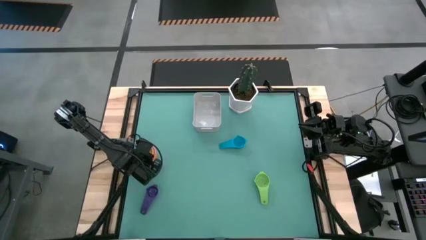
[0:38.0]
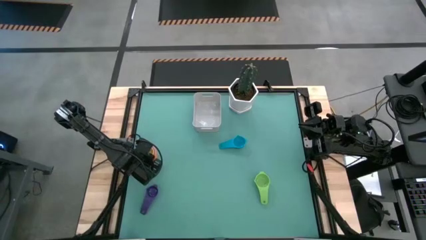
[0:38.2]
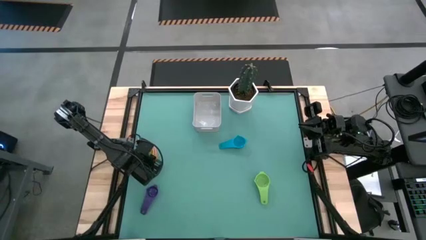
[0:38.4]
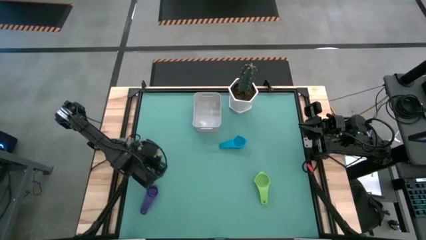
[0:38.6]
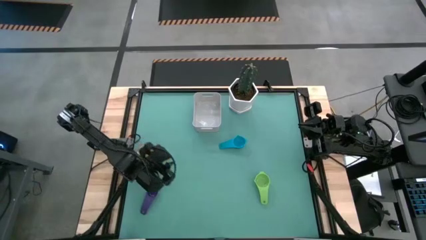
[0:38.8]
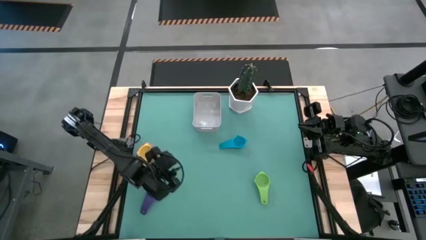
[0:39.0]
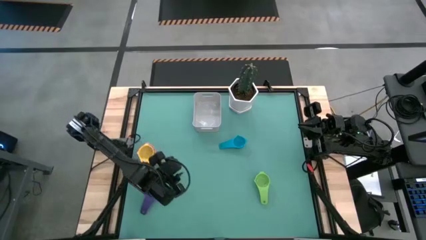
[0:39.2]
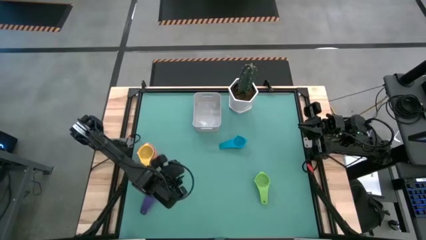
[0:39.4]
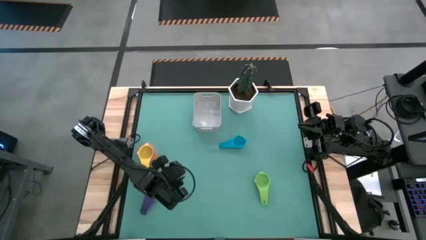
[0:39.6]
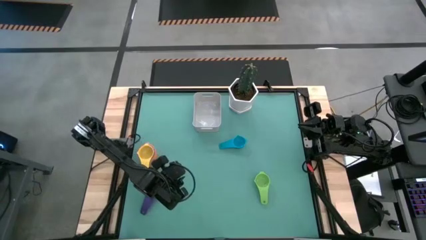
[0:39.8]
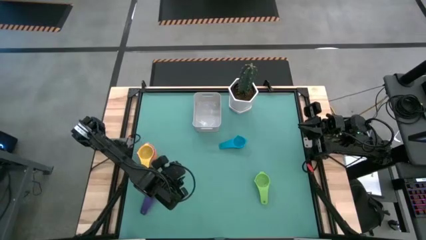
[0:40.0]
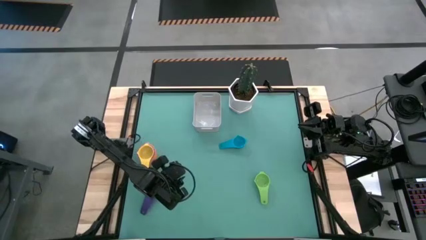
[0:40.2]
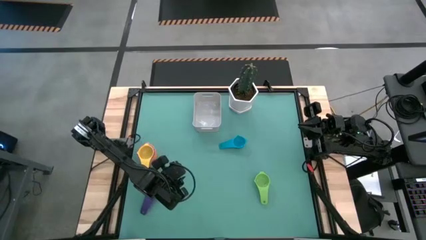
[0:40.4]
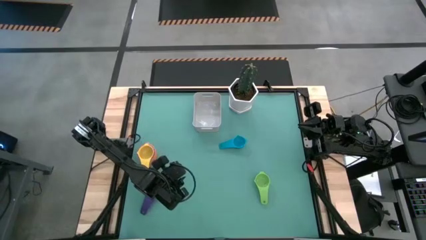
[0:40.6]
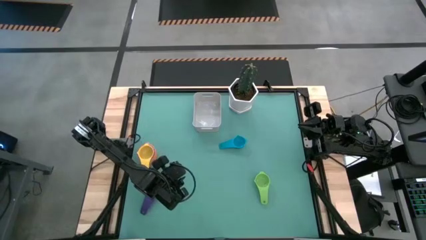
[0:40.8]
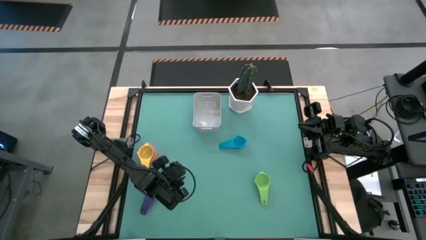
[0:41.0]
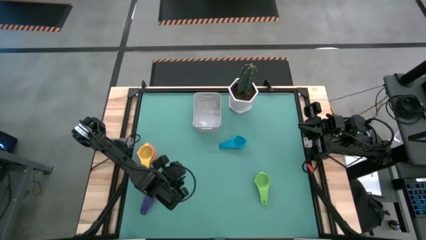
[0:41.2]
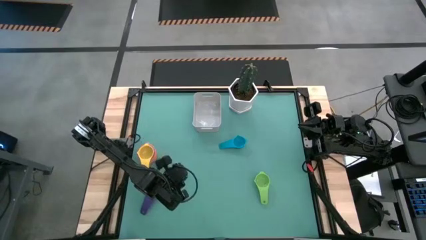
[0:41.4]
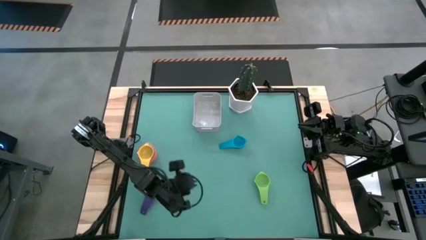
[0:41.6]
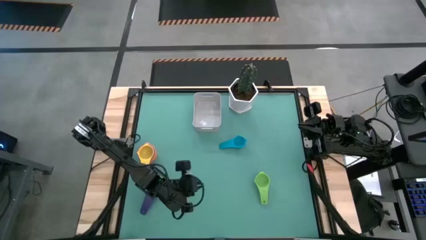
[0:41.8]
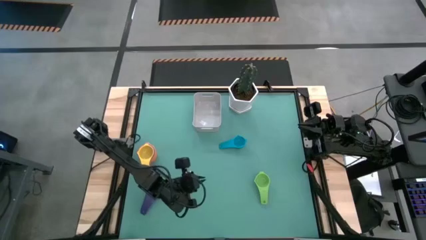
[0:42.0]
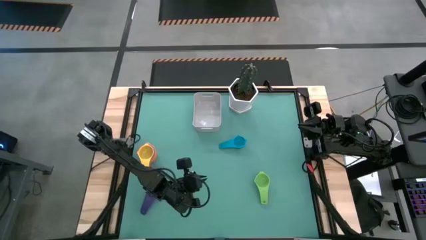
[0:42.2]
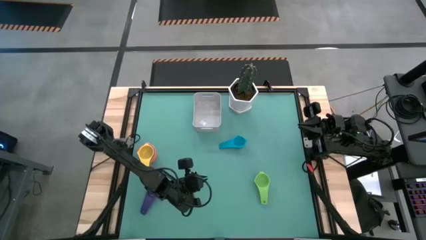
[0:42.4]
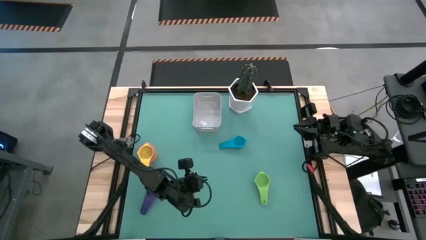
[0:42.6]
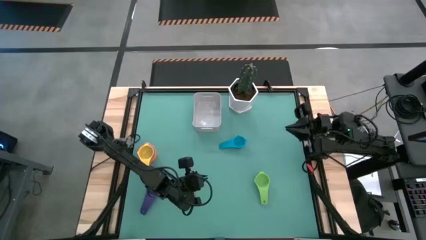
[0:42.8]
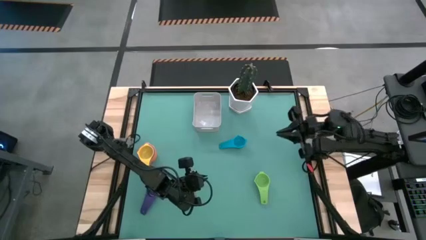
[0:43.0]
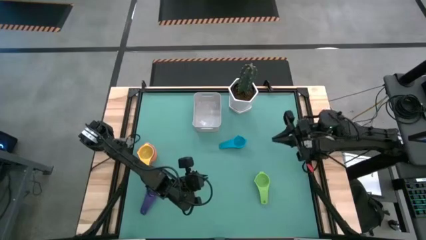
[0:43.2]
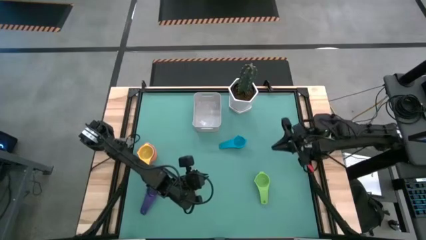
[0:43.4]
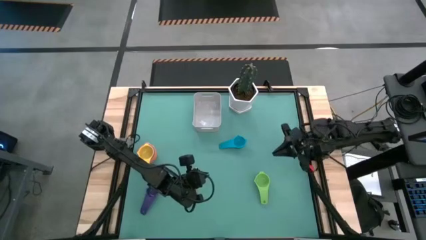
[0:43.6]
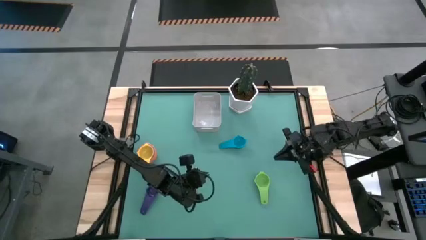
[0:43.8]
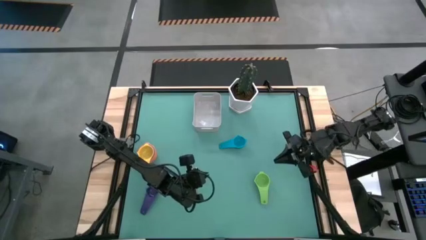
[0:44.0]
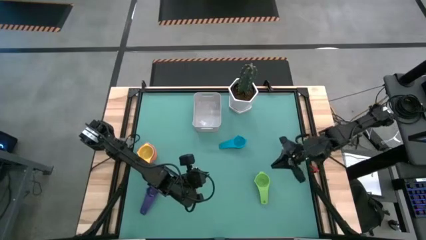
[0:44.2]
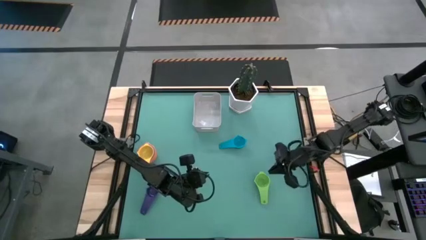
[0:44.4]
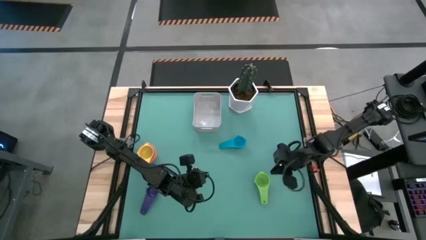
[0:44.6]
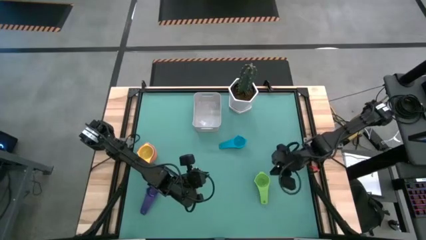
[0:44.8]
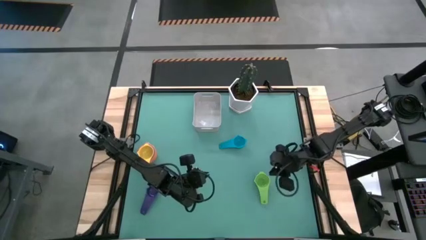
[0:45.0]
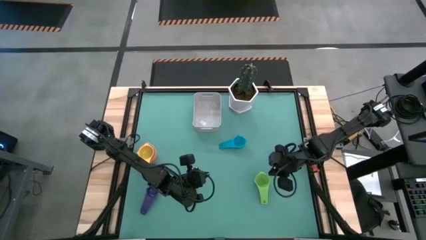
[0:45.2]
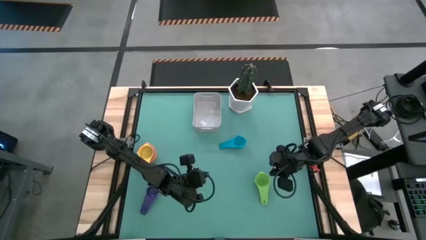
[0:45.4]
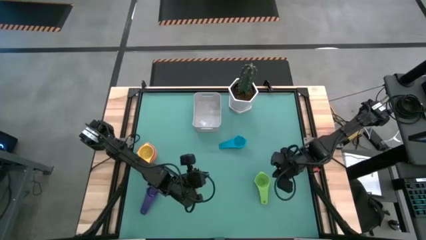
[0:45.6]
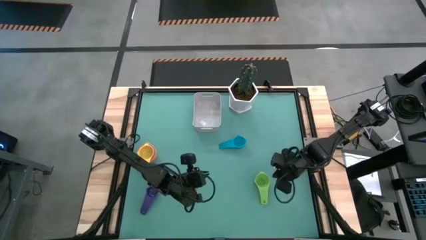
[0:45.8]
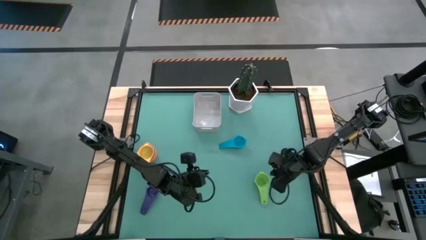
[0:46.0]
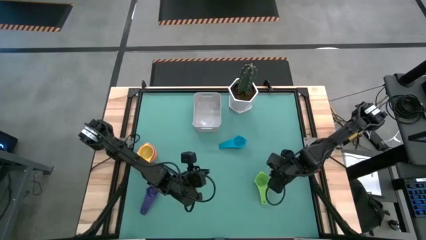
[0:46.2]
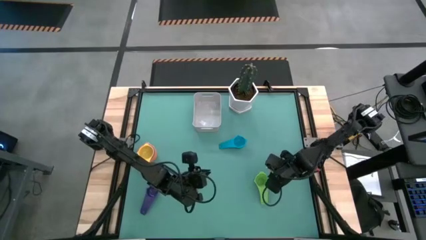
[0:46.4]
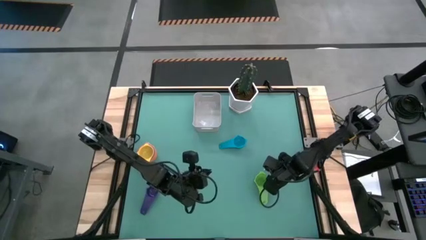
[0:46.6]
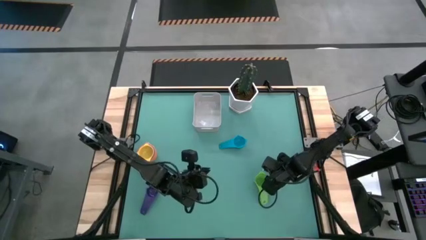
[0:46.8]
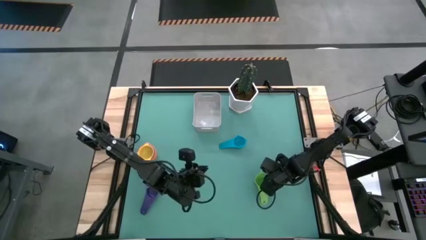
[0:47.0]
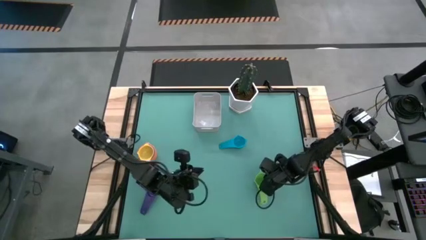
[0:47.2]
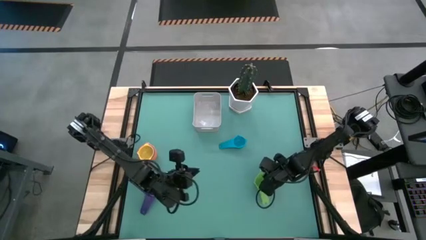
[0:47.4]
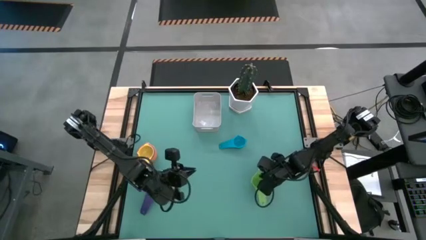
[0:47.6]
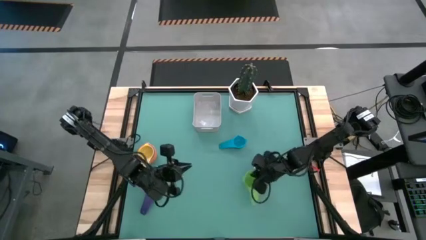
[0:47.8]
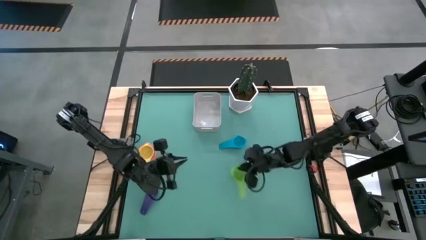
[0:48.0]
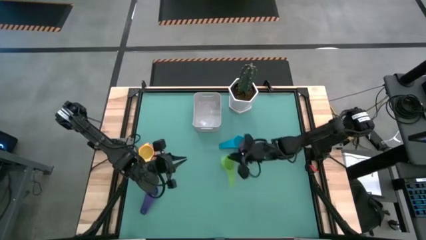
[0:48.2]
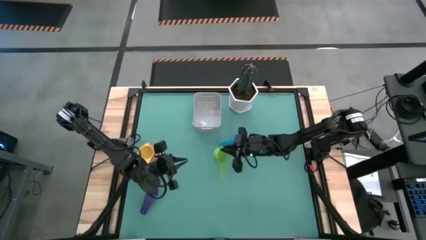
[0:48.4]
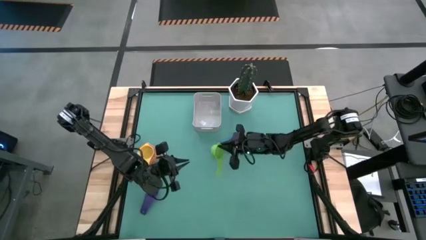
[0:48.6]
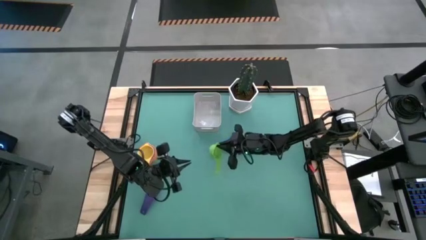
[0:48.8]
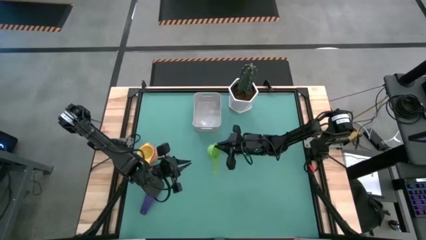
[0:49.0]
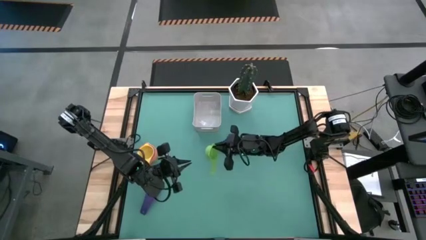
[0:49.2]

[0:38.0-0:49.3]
Task: Nest measuring cups in basket
Stack the green measuring cup on top of the yellow measuring cup

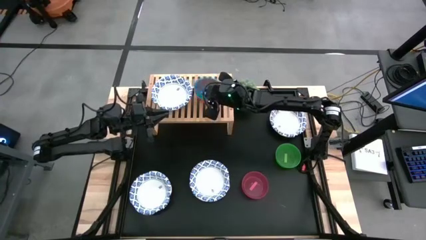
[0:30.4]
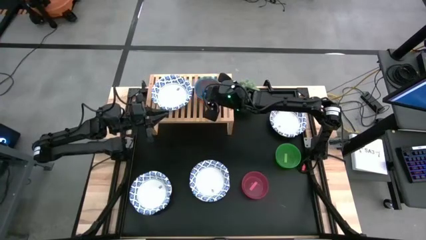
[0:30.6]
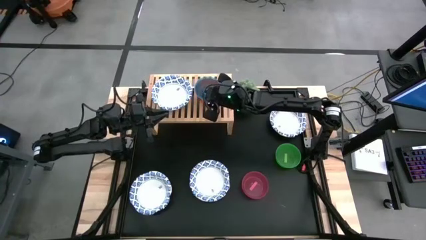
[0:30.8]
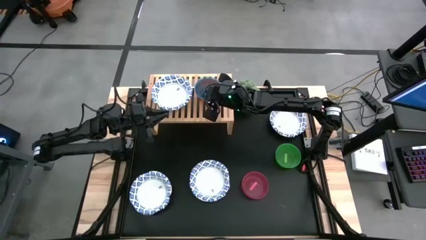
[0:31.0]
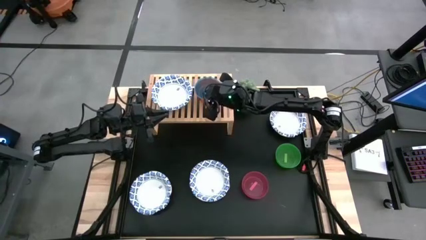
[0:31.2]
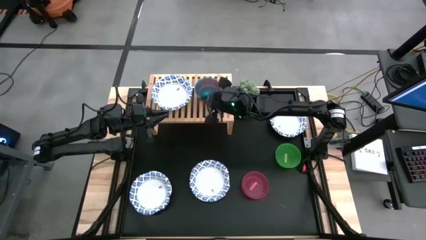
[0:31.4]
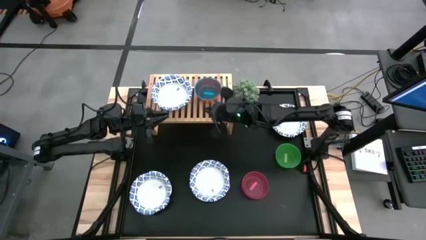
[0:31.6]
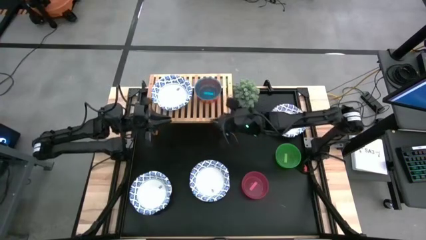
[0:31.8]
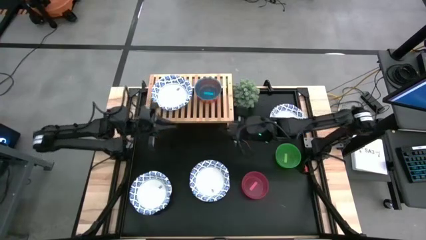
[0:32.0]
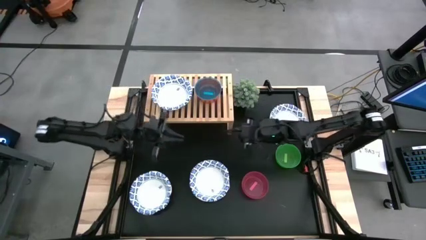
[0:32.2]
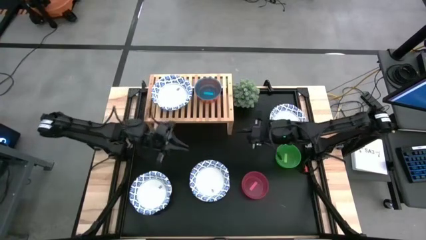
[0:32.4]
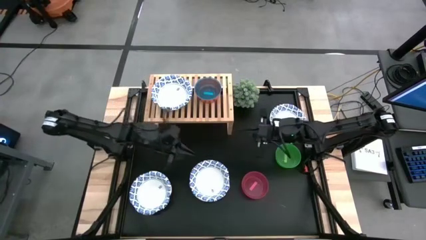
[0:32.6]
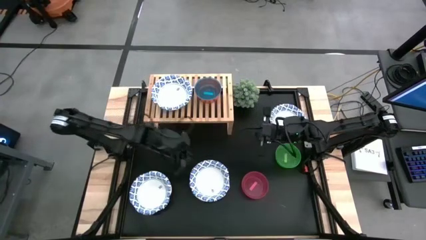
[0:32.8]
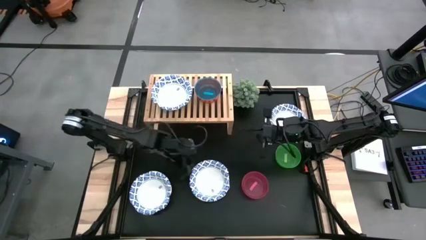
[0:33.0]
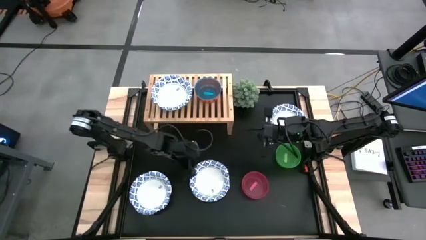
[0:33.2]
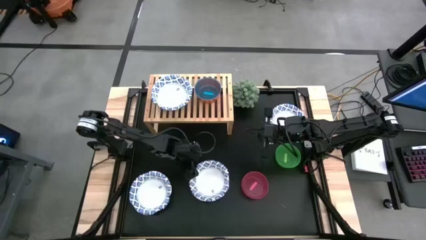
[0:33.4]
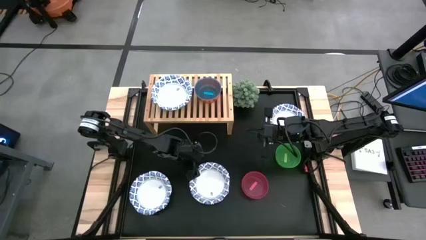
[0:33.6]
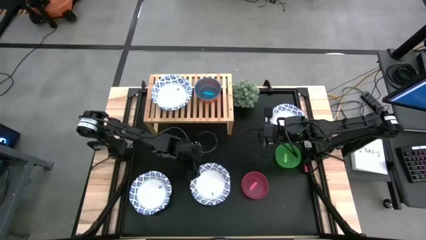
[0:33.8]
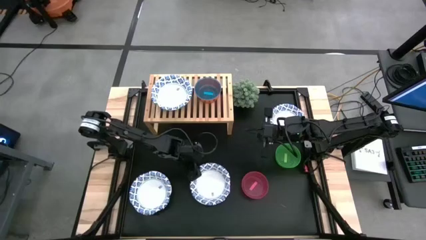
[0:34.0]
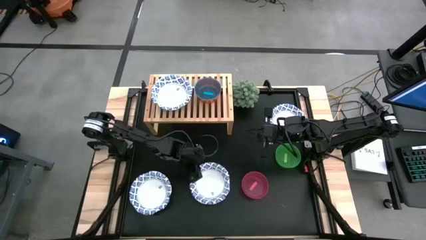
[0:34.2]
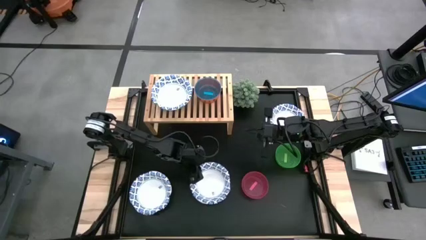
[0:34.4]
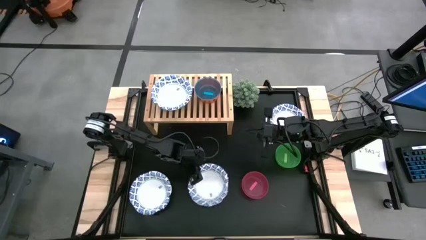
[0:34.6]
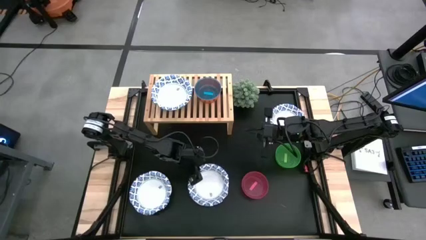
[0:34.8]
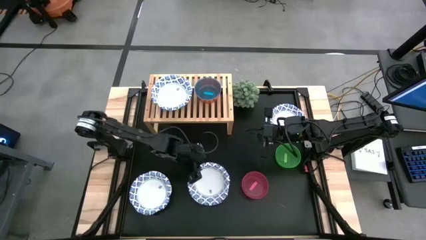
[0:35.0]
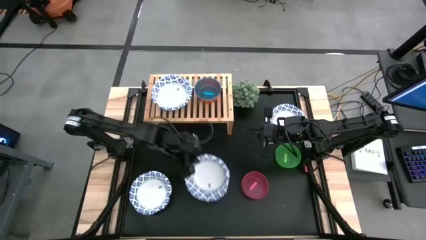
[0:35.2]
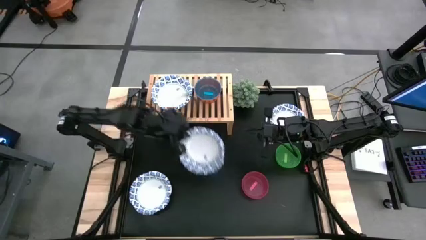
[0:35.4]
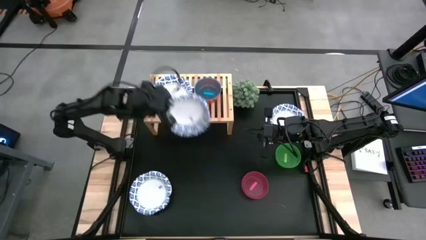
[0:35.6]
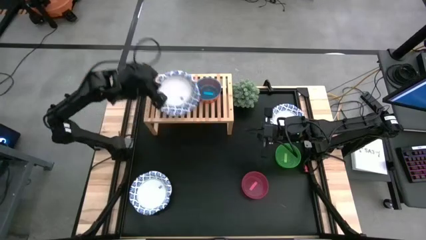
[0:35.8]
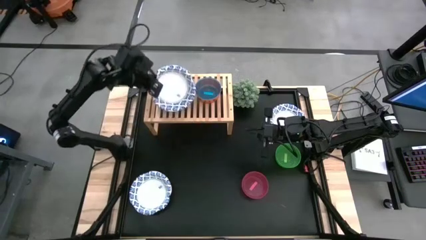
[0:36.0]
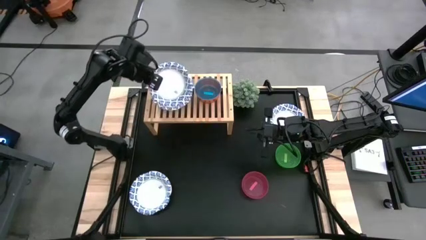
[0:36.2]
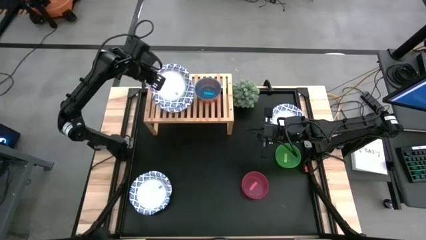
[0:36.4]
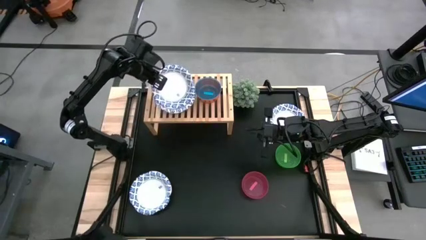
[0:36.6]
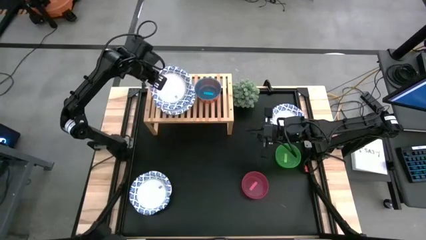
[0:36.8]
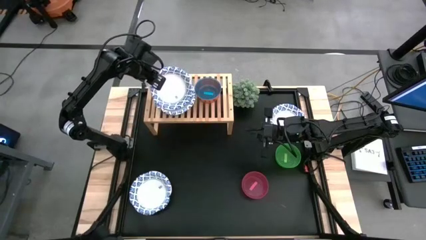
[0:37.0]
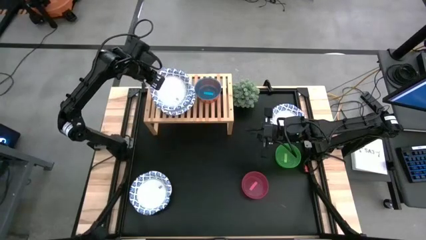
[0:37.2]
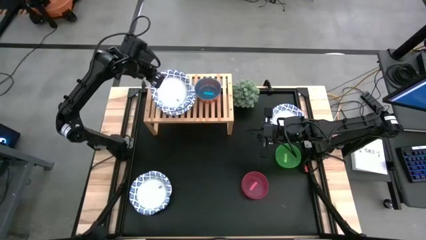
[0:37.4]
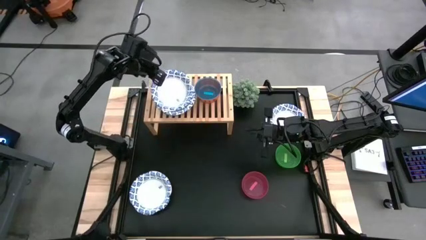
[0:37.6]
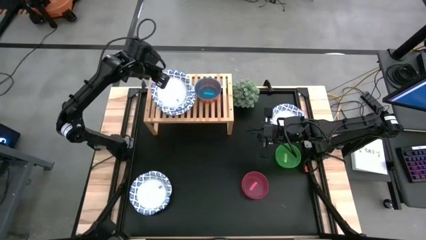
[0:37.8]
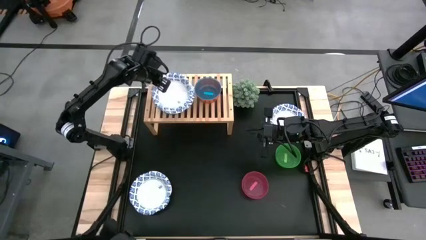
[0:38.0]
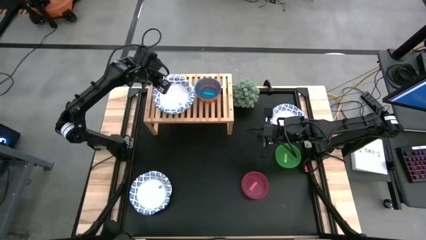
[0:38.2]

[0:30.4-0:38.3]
Task: Place and stack bowls onto a shelf
Stack the white patterned bowl on top of the white patterned bowl on the shelf
